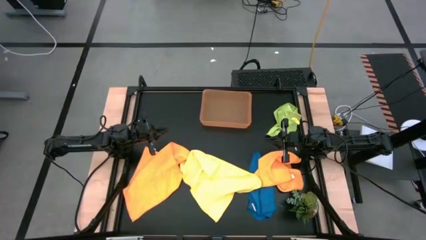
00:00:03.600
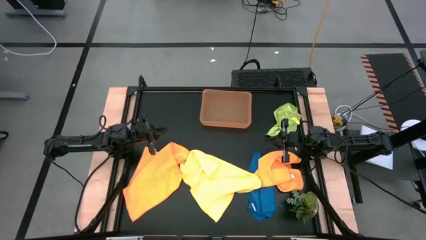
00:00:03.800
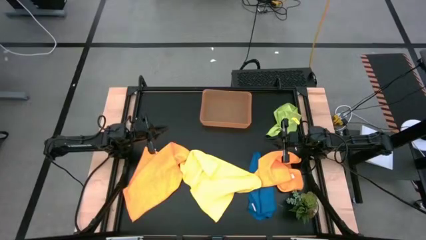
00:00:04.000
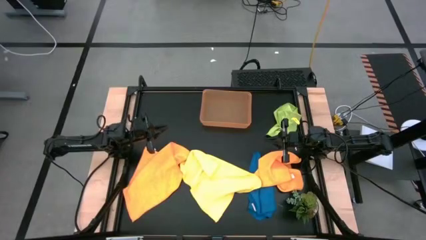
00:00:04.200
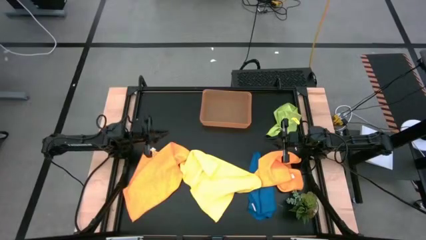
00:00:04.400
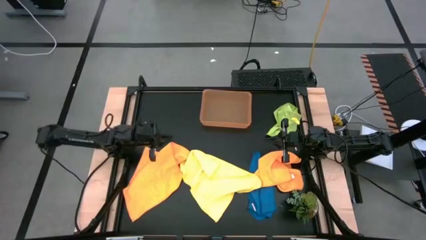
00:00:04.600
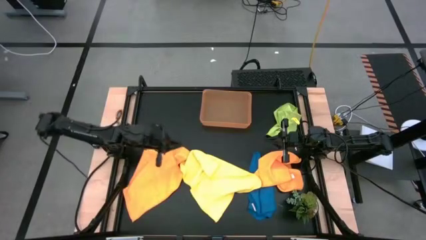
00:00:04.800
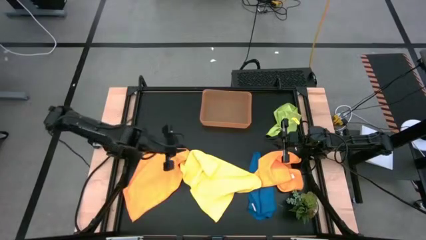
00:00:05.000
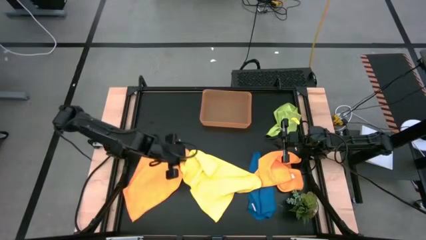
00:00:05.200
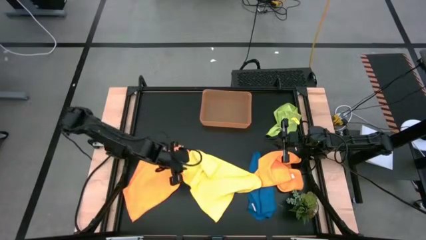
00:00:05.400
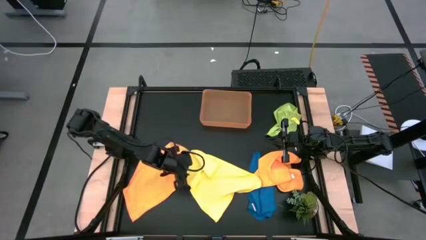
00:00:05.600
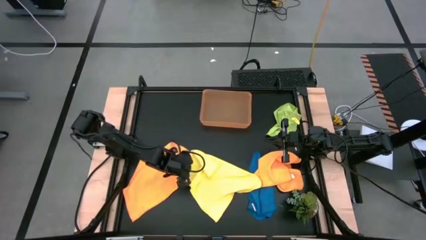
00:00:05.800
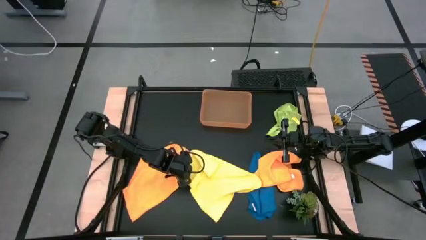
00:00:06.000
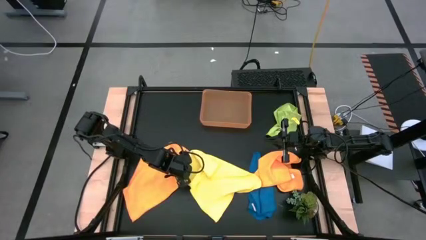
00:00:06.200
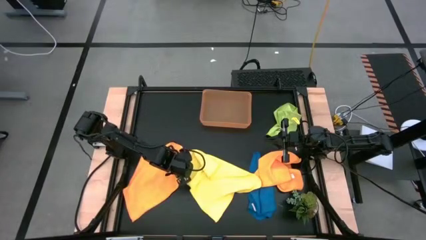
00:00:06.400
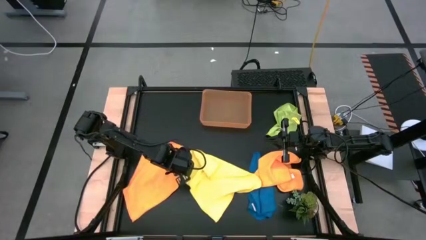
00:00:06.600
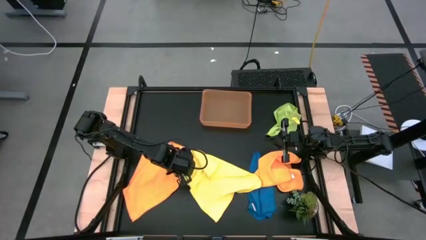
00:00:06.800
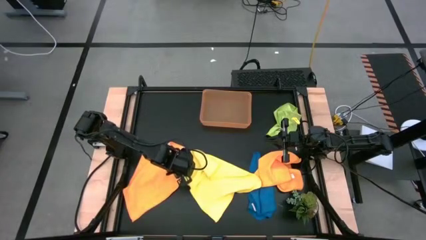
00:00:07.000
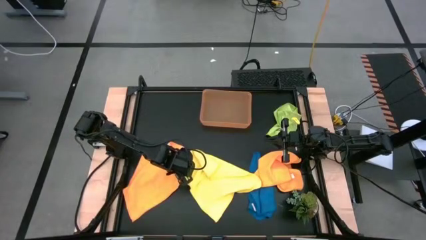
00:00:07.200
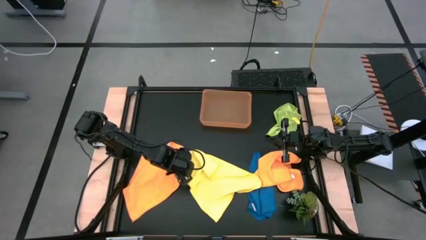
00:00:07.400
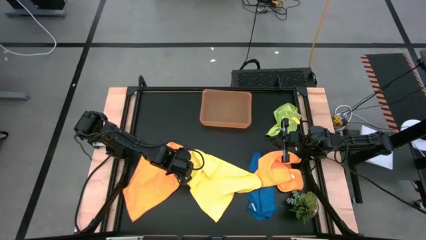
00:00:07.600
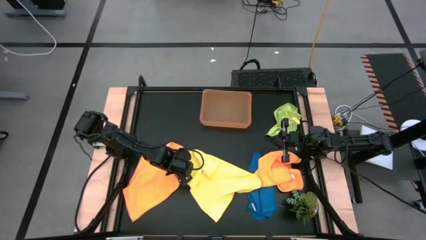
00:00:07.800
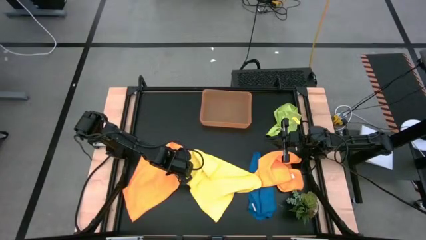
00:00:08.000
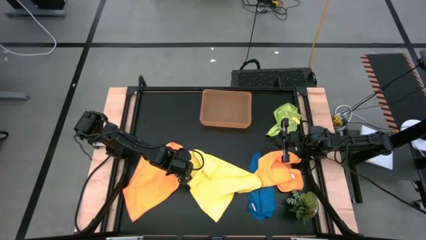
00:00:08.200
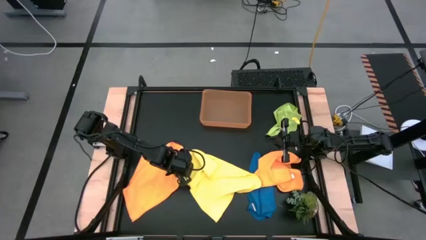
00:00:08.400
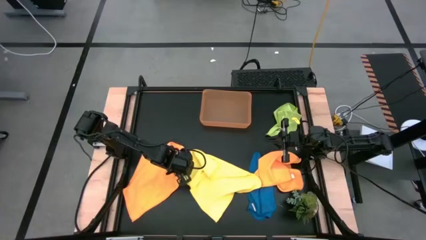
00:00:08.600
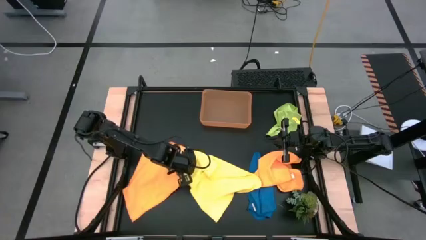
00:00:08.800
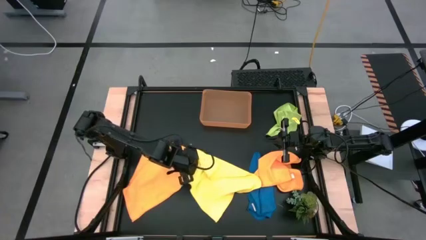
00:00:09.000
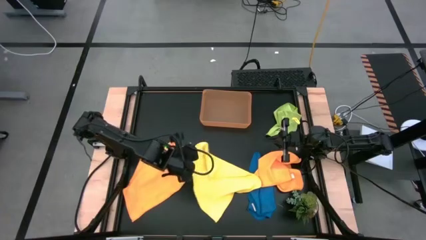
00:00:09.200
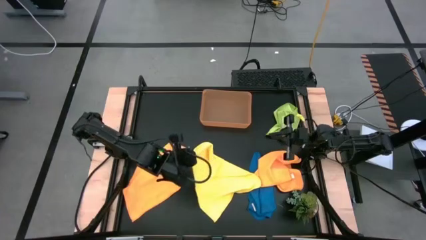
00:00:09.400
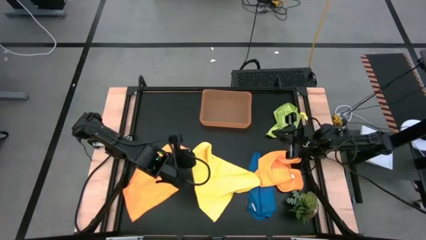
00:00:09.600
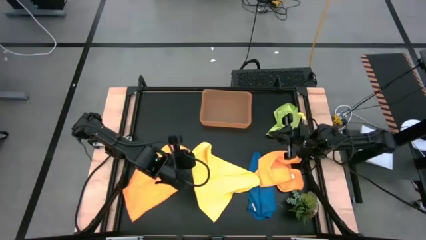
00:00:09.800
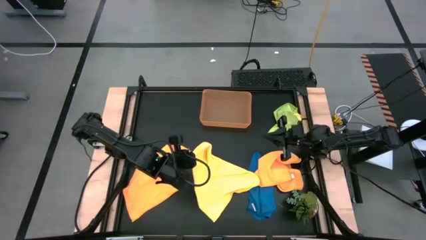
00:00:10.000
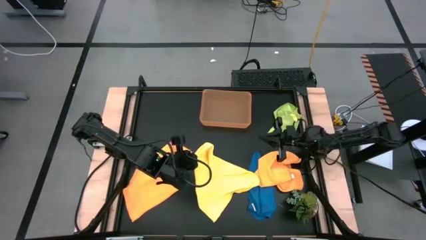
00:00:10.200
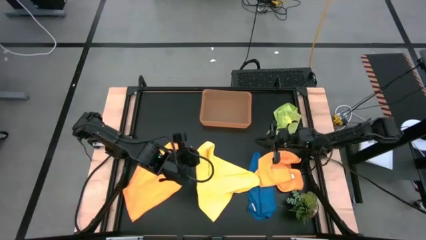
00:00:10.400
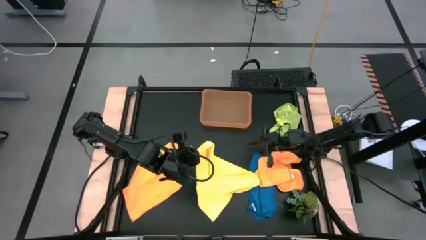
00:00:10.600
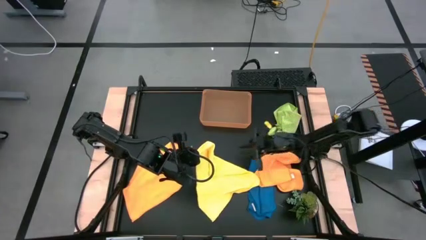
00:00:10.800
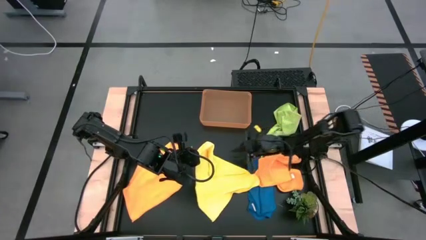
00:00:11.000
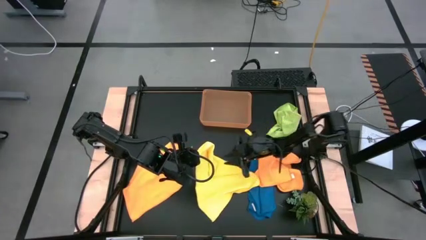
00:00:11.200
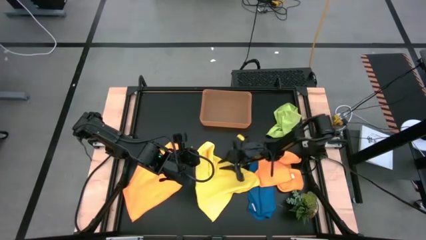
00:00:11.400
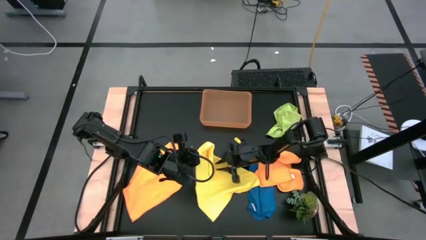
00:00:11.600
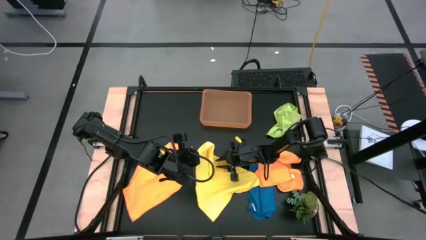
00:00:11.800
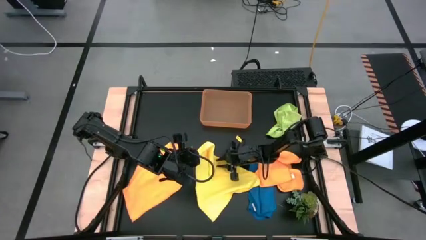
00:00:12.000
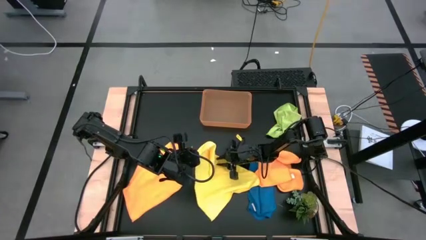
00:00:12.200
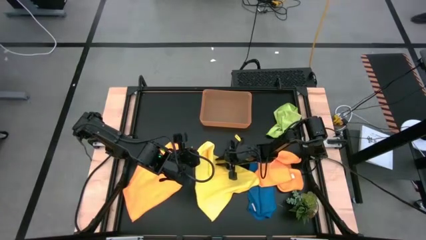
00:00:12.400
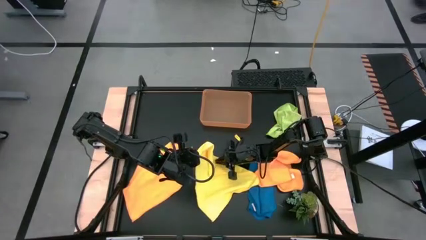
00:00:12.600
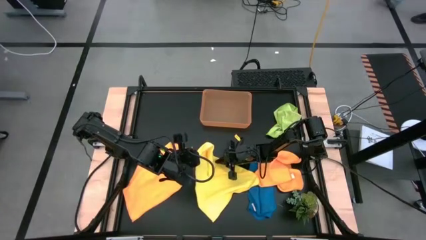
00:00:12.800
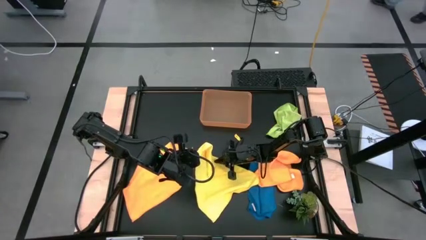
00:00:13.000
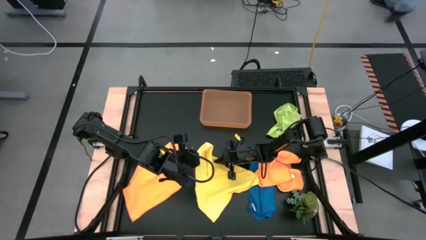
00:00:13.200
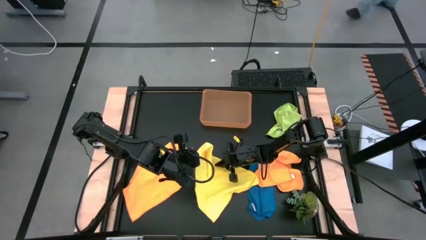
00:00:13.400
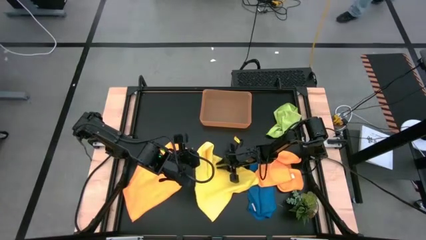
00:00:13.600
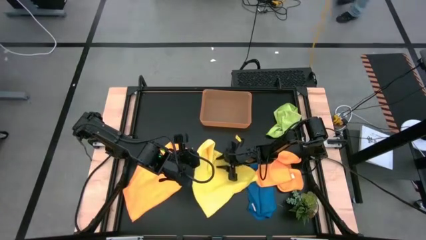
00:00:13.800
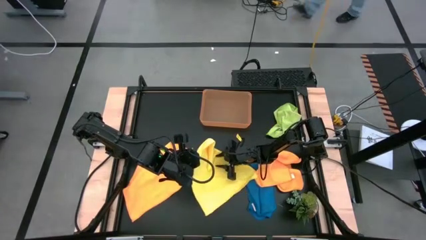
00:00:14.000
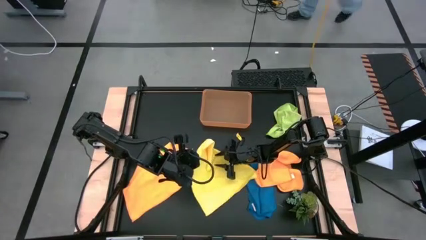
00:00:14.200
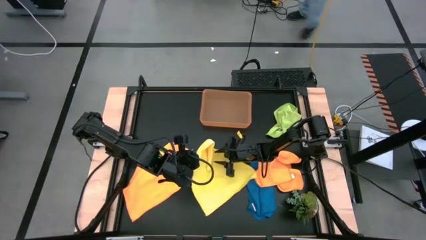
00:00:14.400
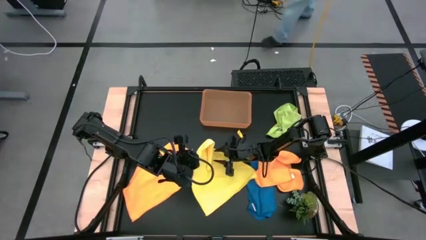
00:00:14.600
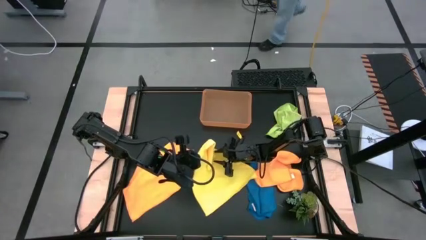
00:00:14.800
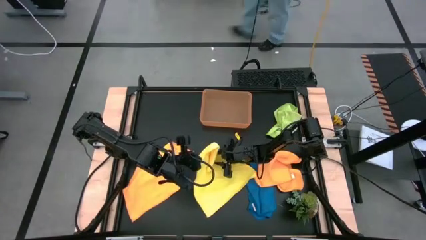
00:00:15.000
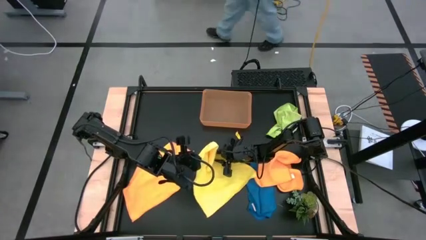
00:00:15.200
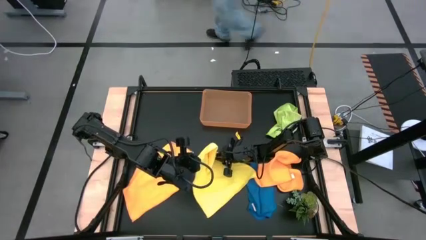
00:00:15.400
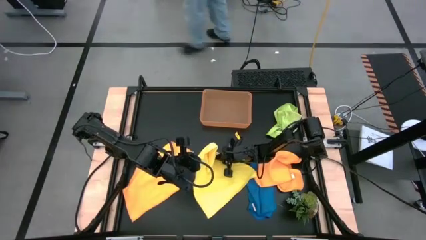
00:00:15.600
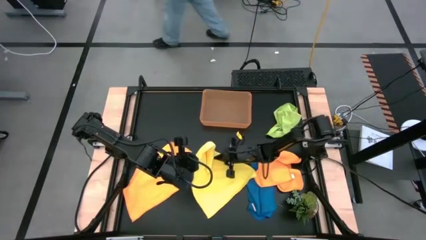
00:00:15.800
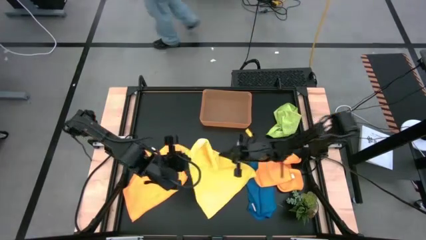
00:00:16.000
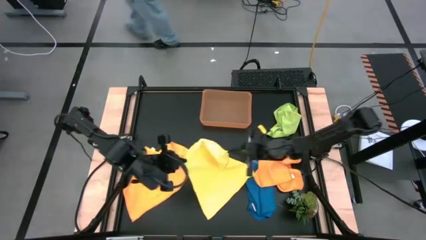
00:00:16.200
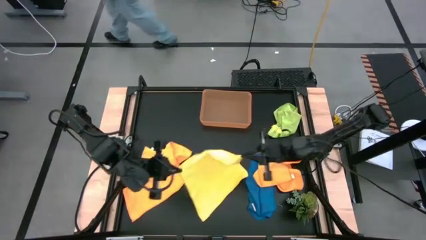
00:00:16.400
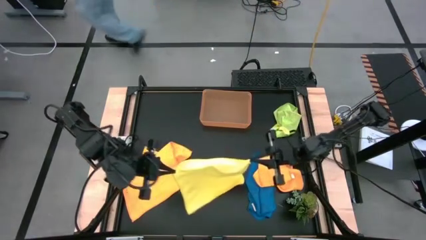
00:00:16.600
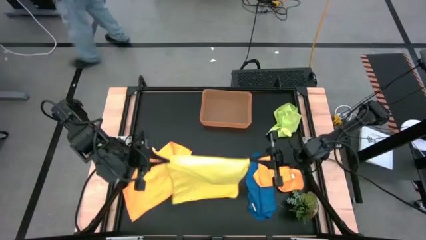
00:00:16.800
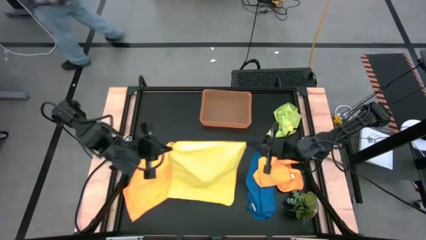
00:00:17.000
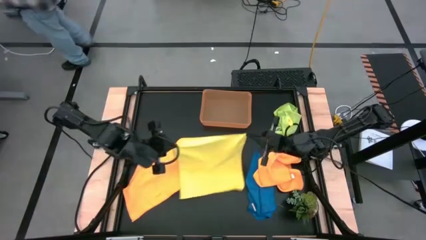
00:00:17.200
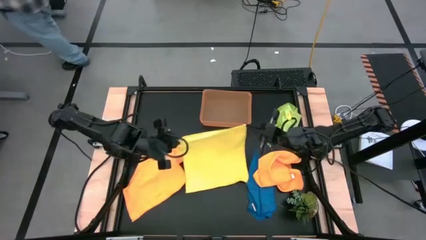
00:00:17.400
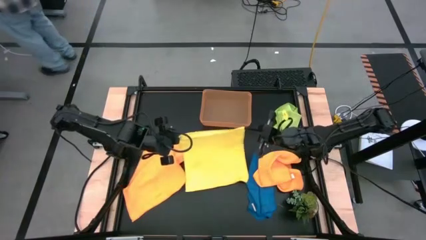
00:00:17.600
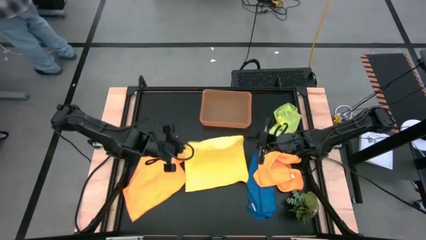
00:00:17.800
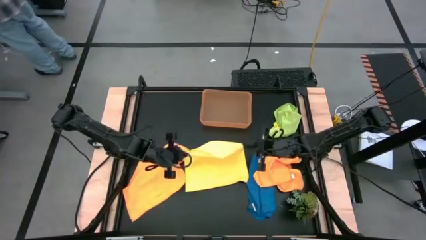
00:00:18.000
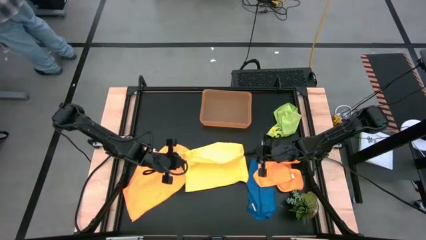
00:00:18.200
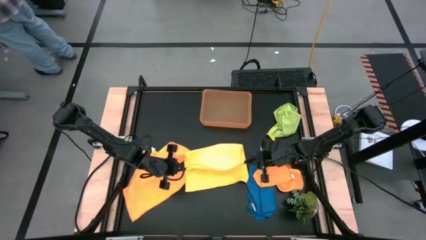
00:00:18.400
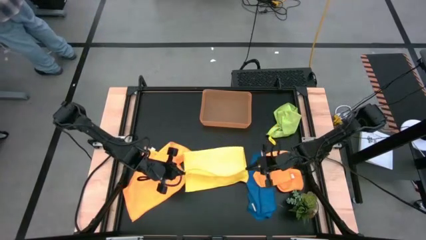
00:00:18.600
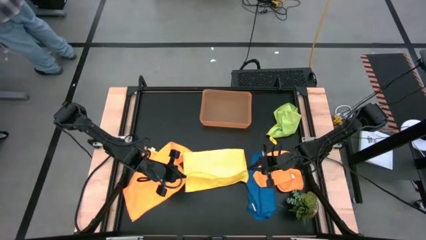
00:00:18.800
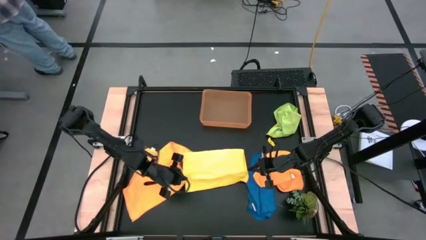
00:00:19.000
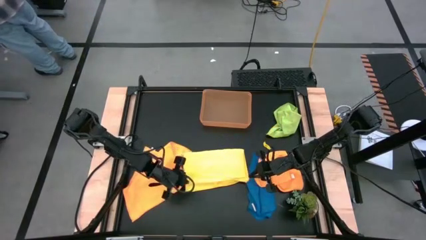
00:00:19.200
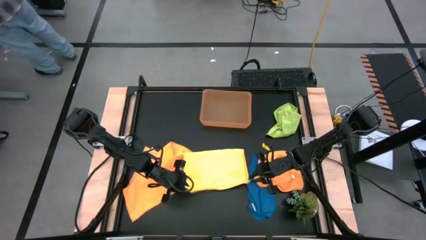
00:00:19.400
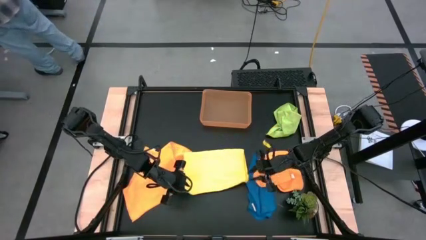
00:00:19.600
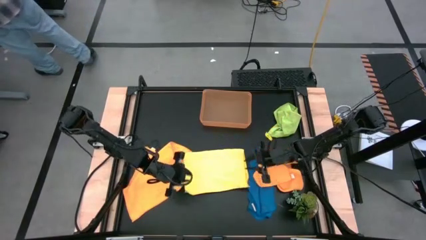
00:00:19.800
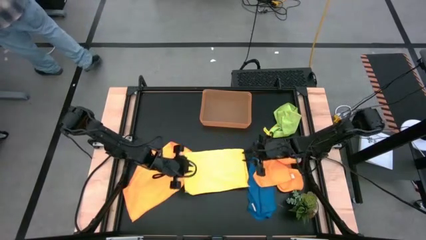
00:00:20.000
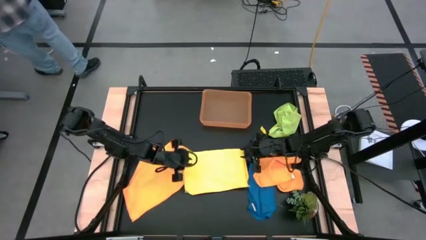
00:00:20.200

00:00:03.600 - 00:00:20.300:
Task: Fold microfiber towels
Fold the yellow towel
